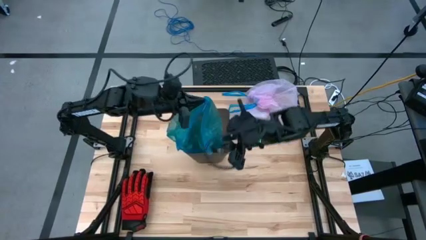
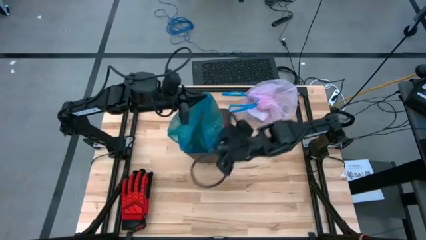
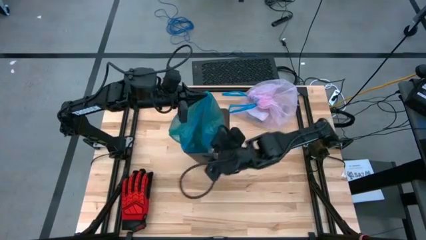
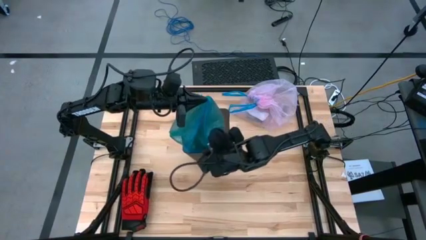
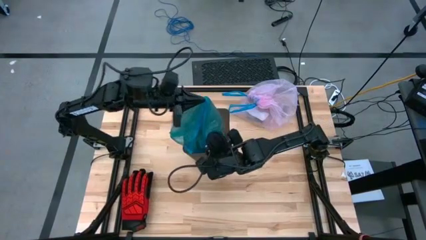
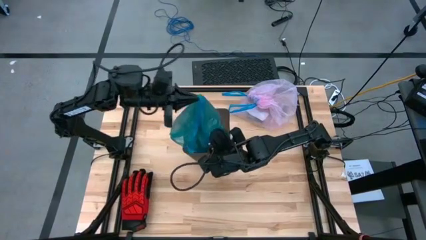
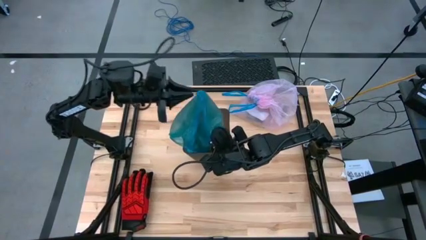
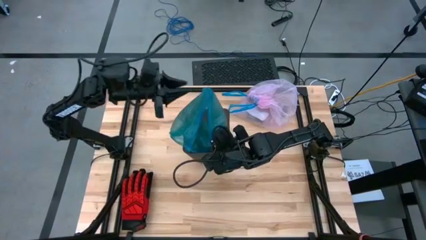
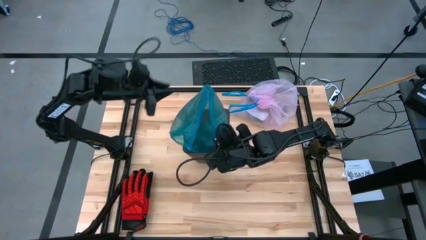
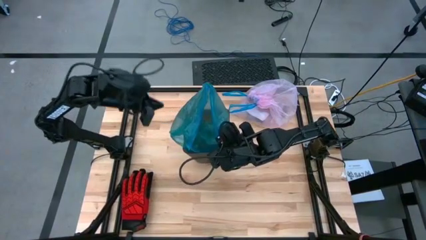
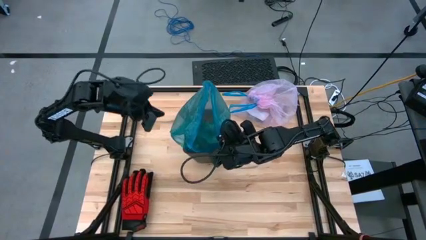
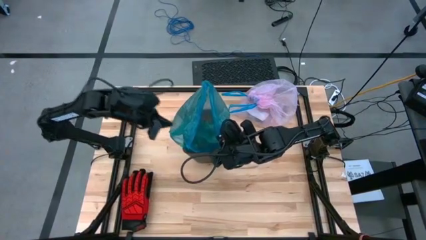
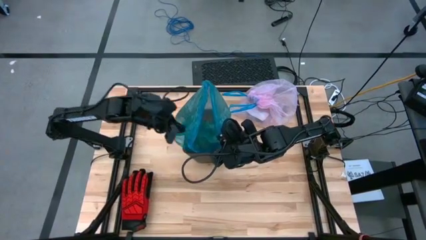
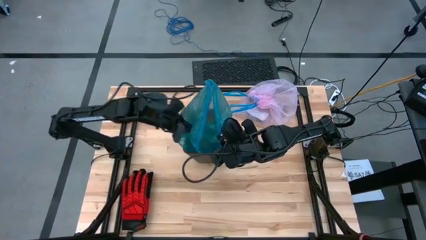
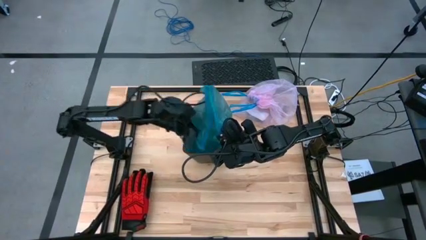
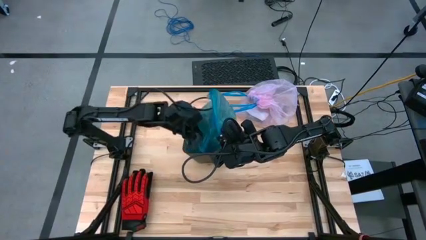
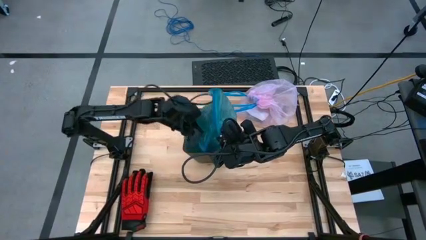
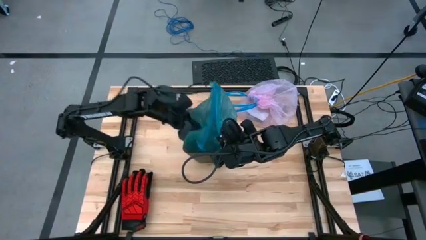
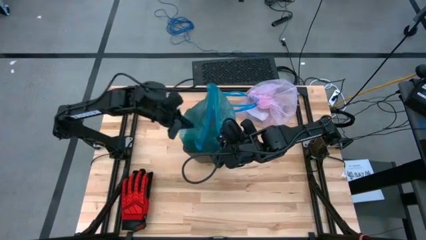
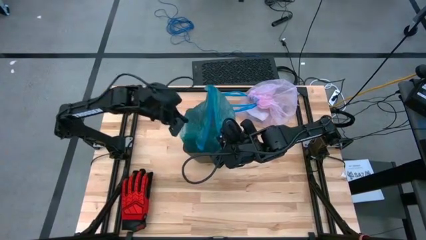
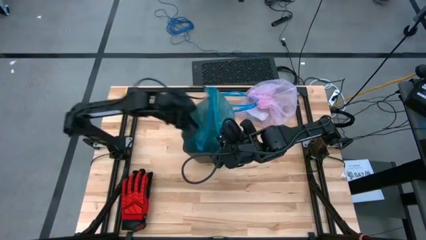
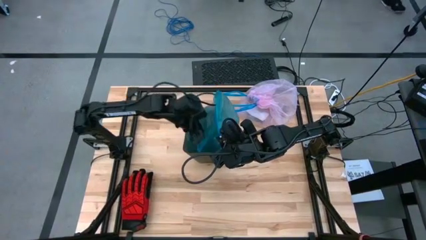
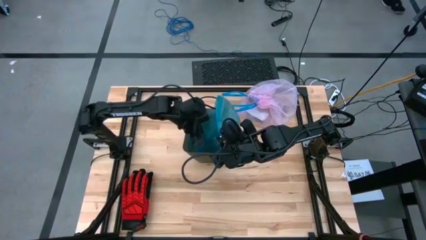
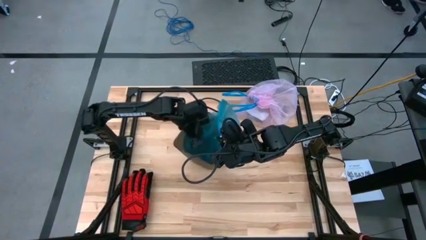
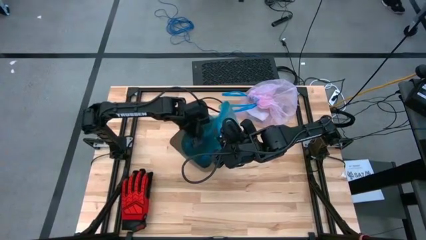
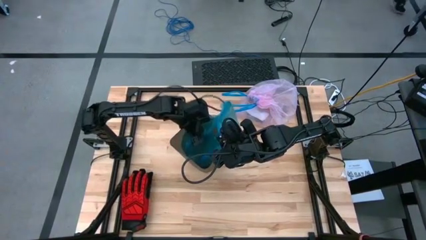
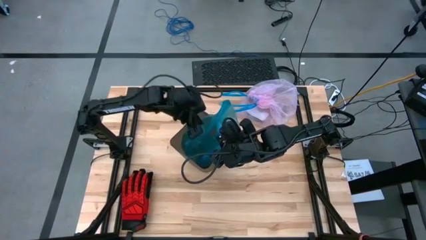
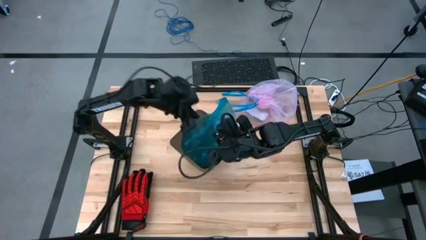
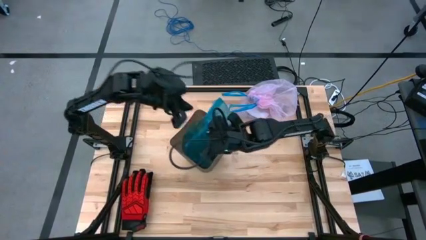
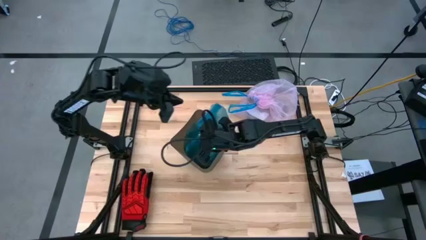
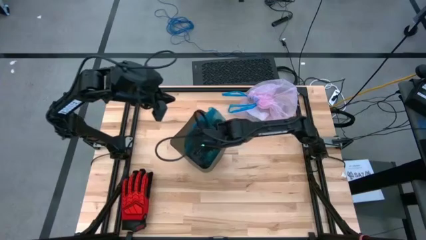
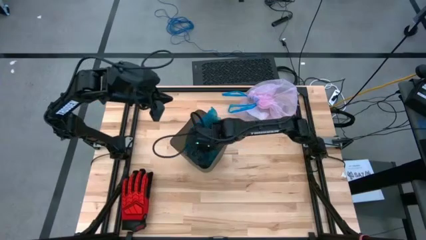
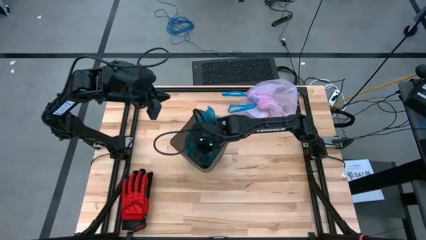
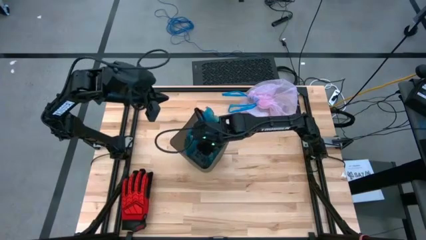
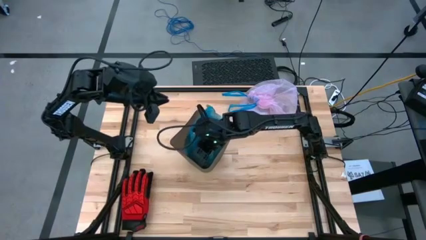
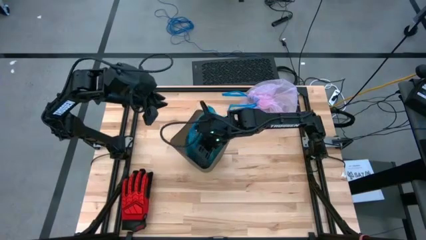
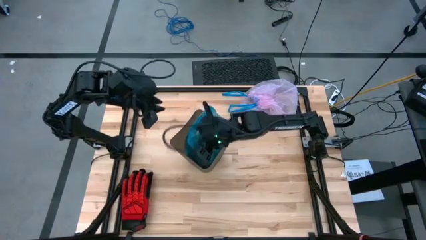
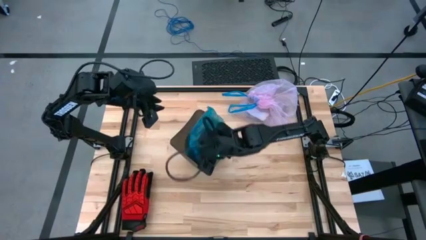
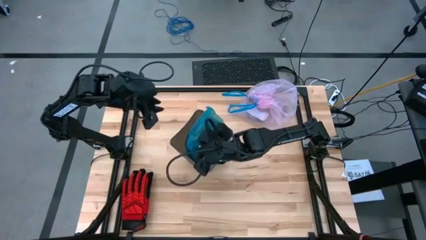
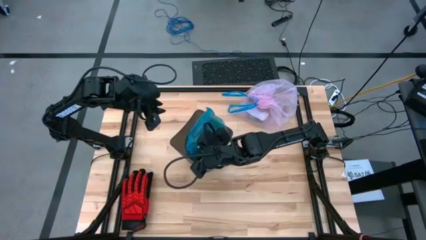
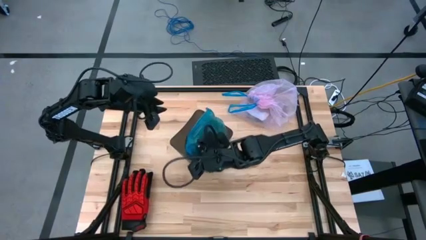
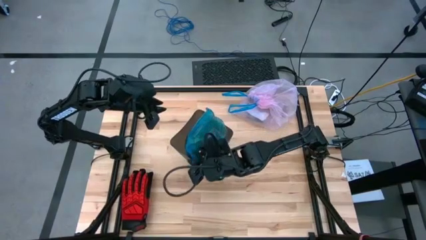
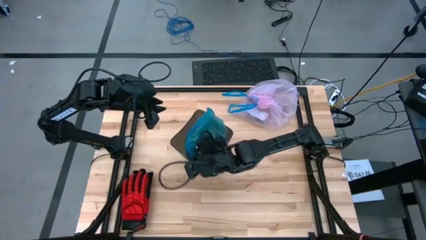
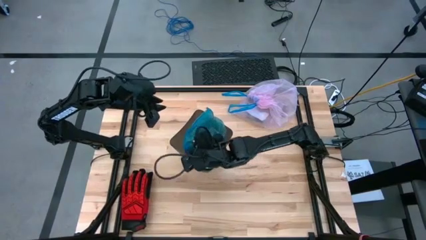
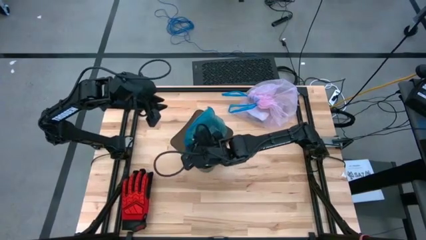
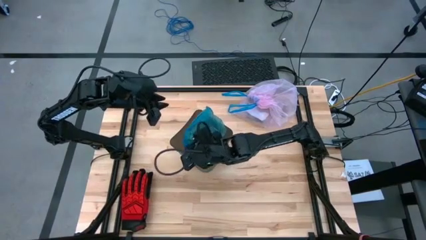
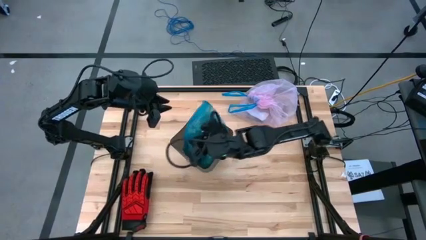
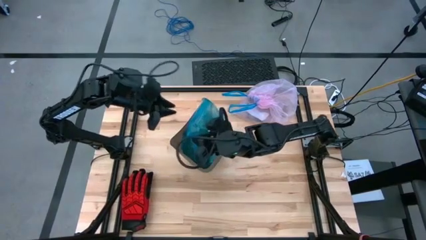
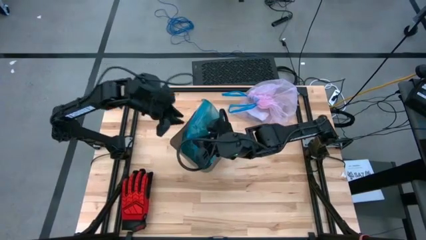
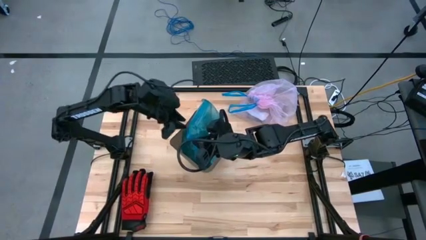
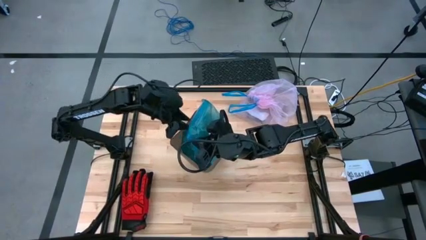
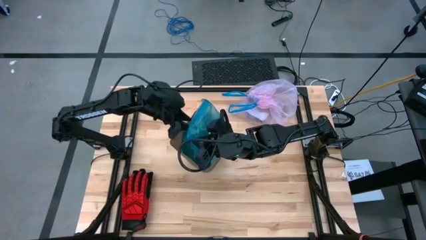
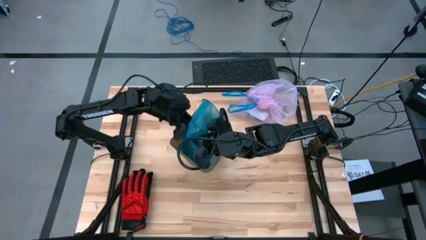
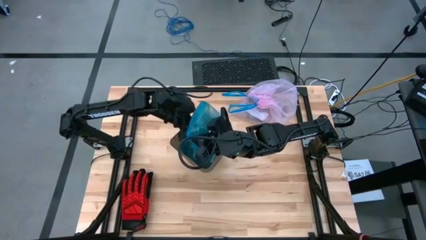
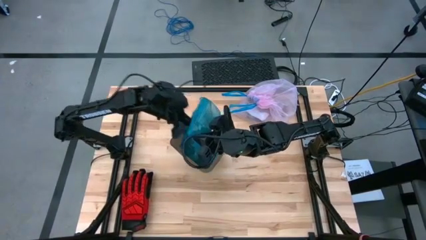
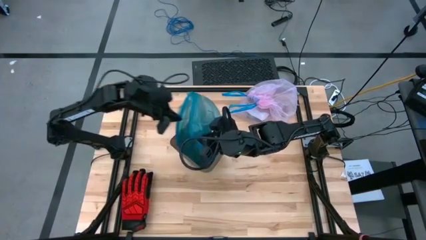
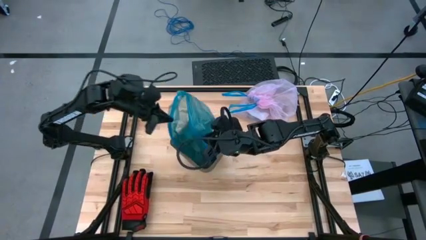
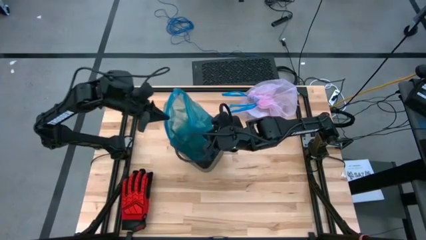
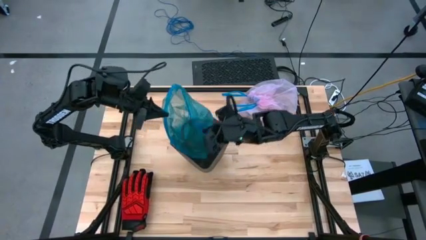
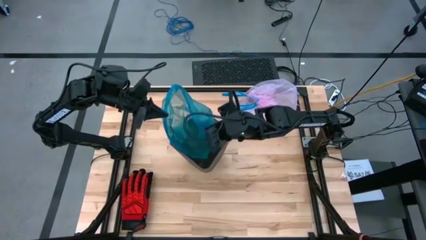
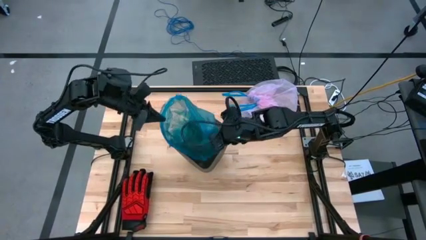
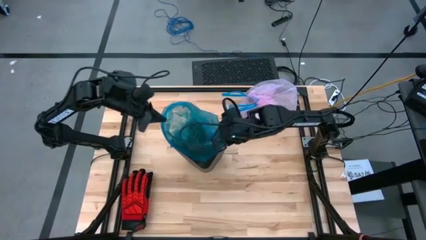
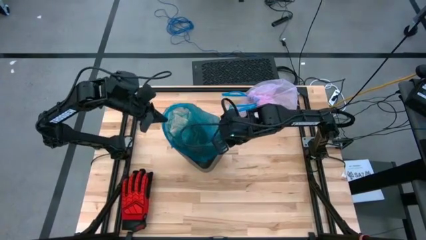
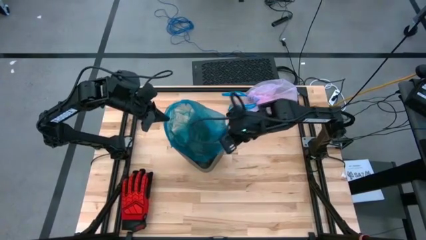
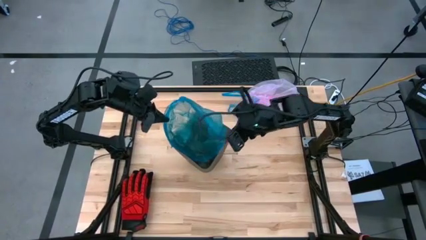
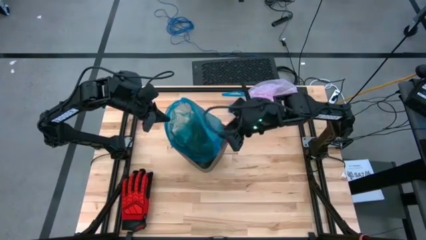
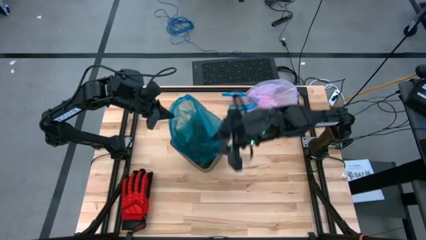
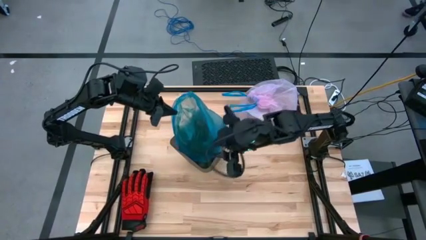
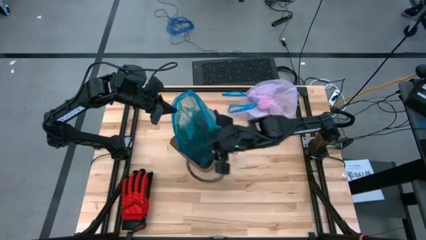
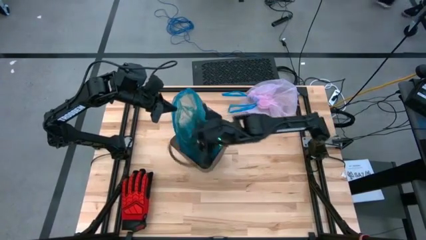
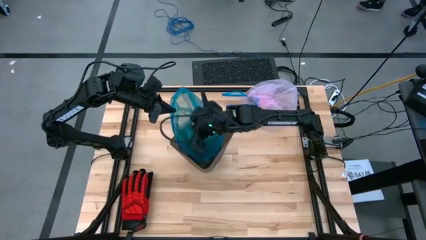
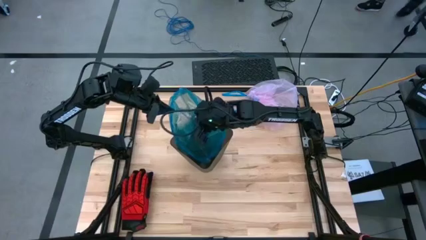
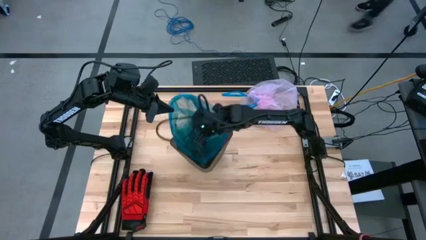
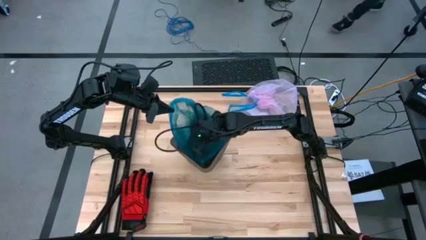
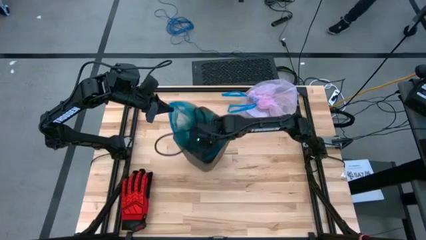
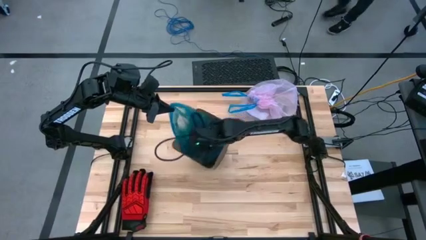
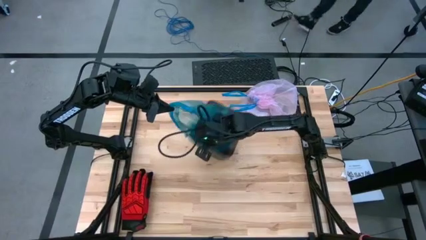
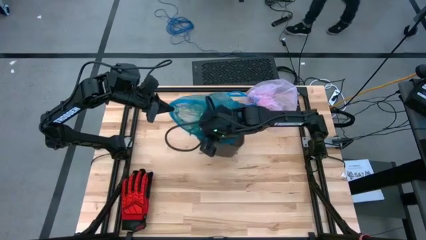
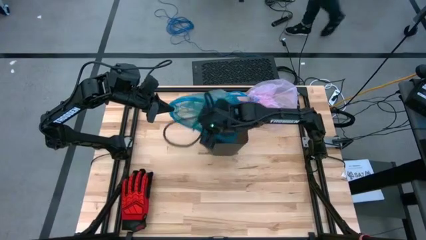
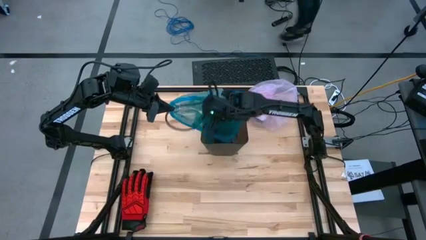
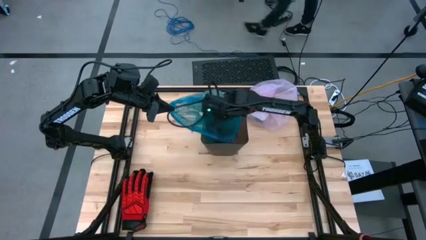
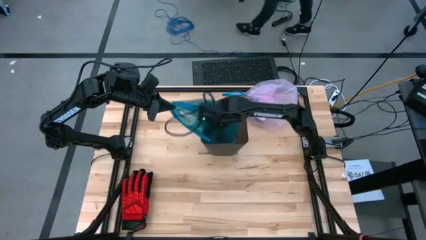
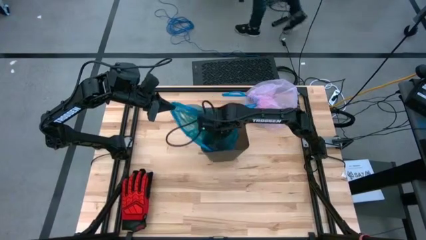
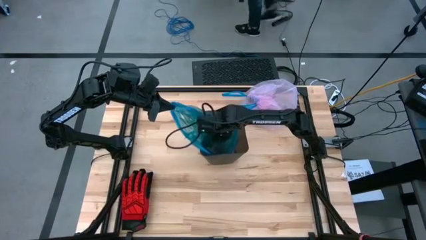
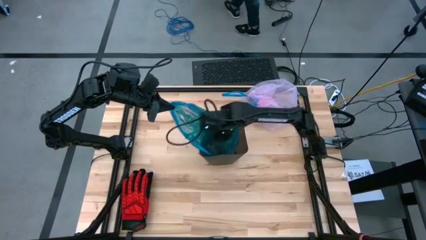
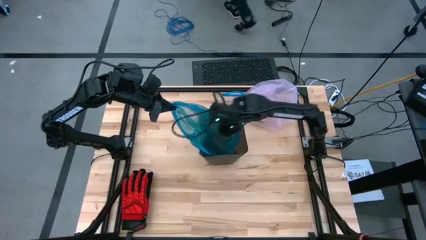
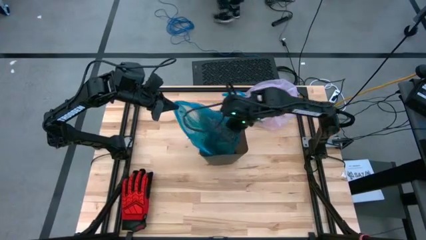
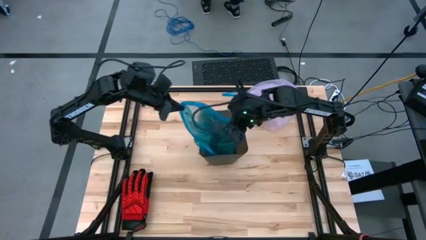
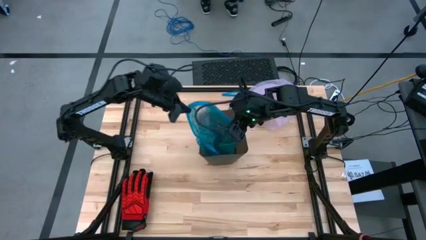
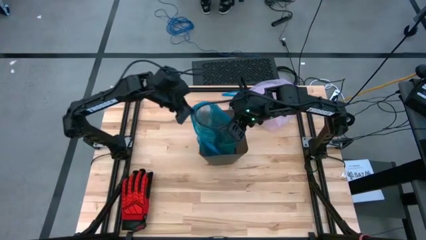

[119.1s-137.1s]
Task: place trash/remove bag and relplace
Insert the blue trash bag into the trash bin
